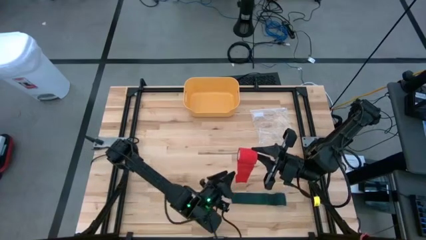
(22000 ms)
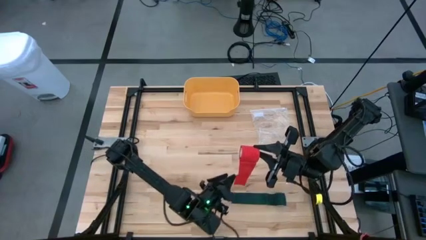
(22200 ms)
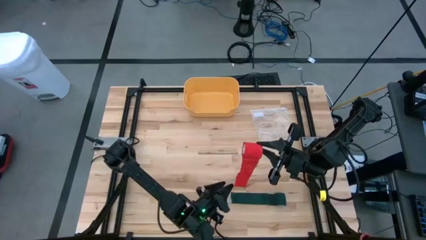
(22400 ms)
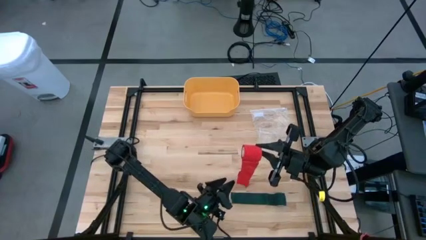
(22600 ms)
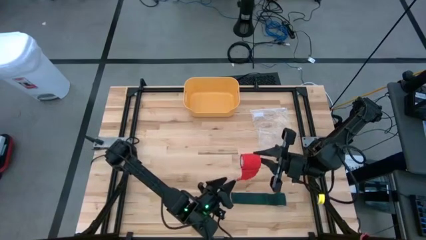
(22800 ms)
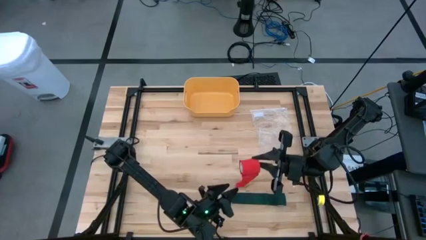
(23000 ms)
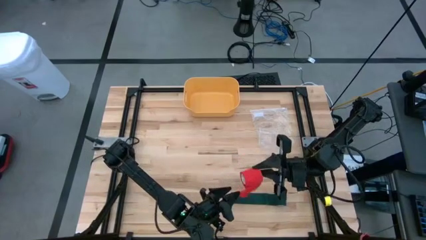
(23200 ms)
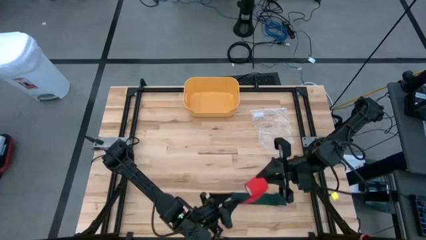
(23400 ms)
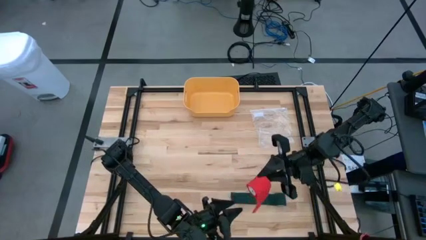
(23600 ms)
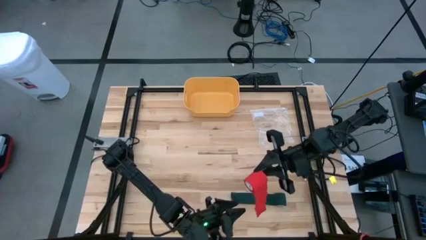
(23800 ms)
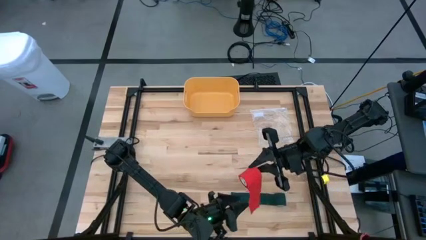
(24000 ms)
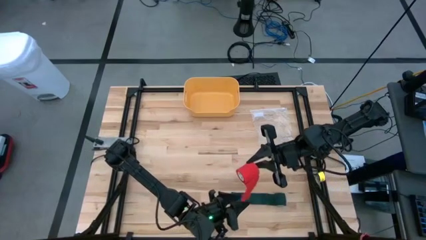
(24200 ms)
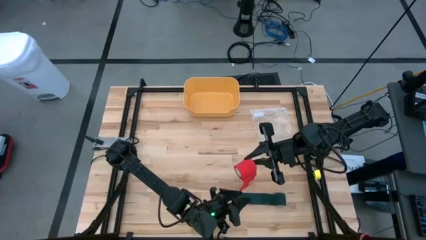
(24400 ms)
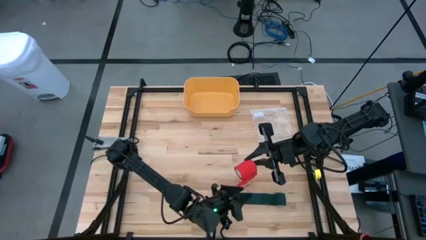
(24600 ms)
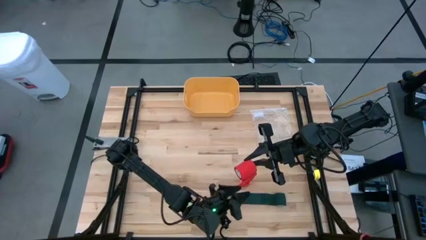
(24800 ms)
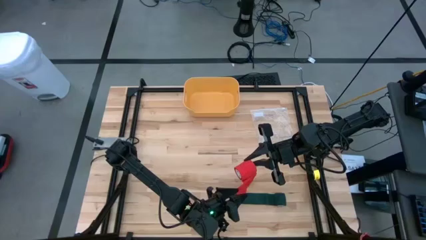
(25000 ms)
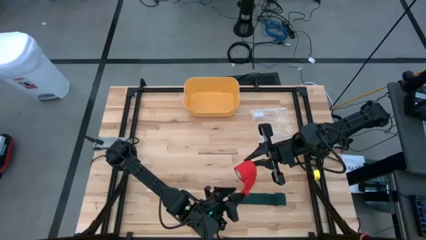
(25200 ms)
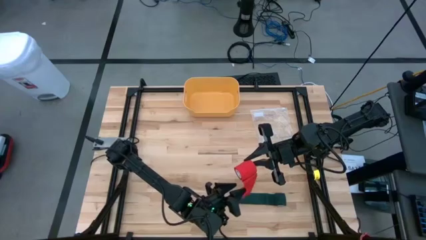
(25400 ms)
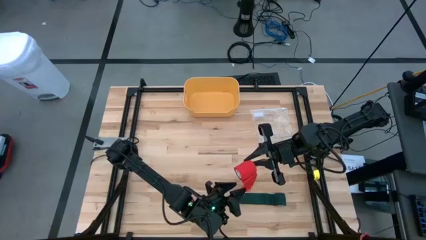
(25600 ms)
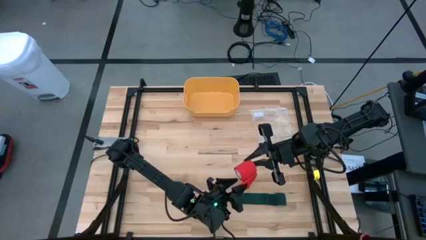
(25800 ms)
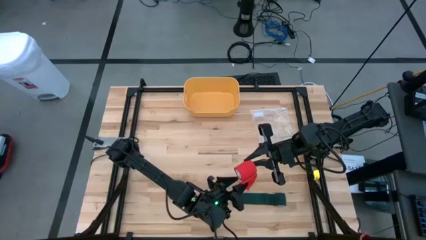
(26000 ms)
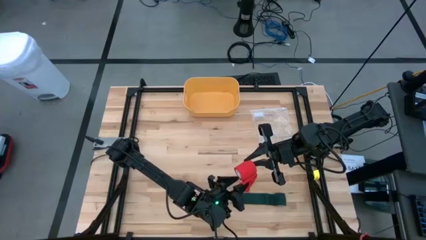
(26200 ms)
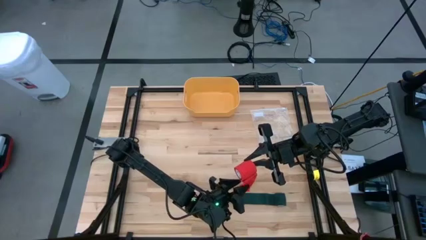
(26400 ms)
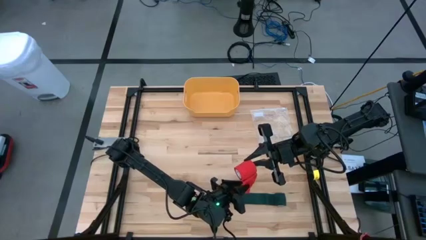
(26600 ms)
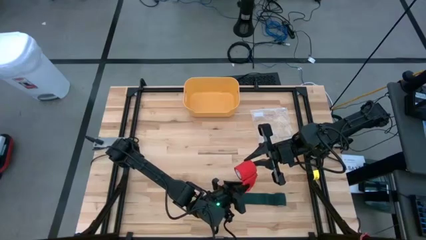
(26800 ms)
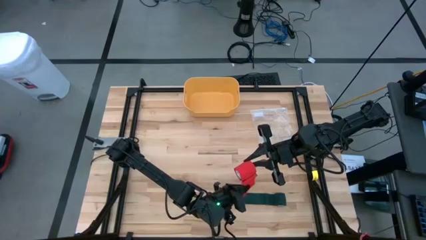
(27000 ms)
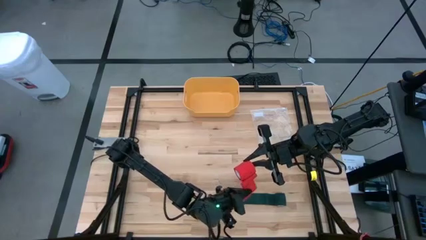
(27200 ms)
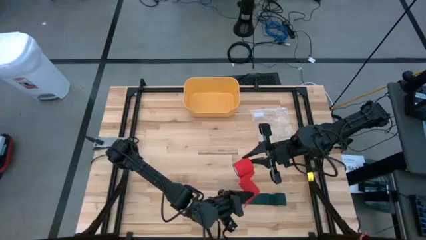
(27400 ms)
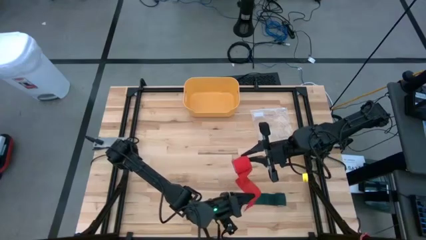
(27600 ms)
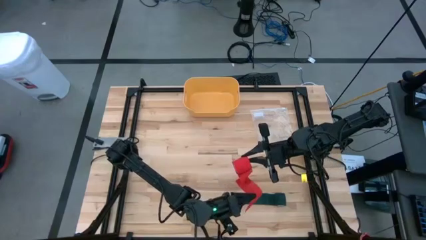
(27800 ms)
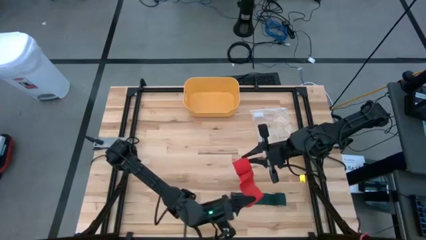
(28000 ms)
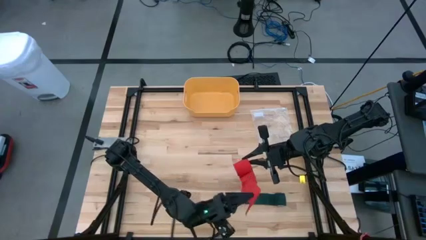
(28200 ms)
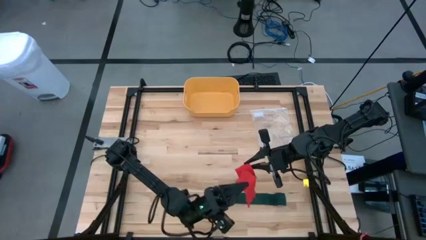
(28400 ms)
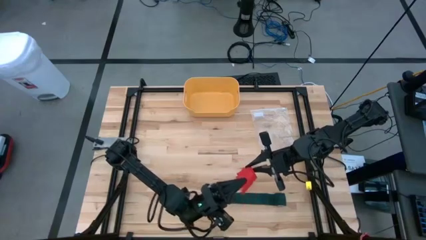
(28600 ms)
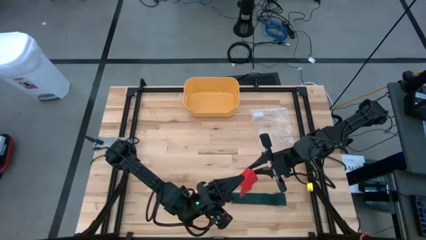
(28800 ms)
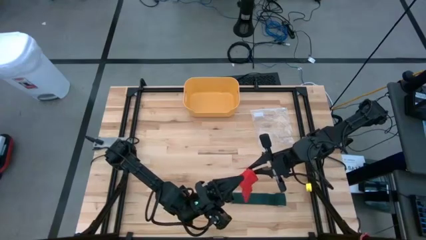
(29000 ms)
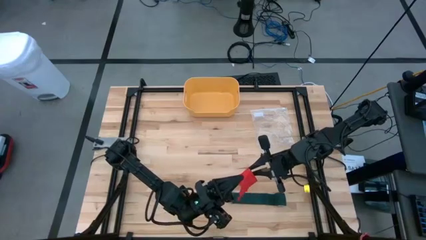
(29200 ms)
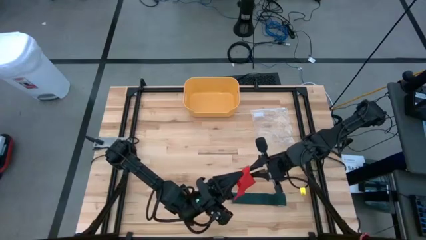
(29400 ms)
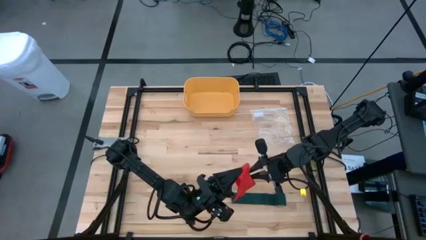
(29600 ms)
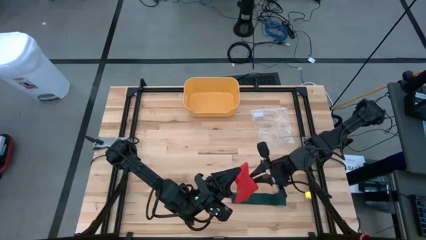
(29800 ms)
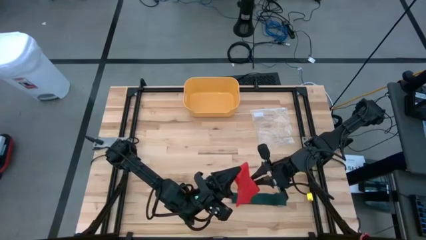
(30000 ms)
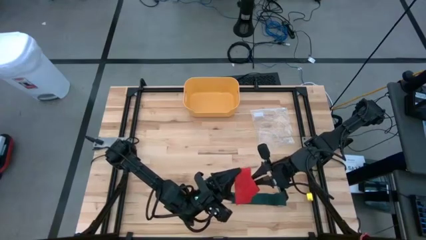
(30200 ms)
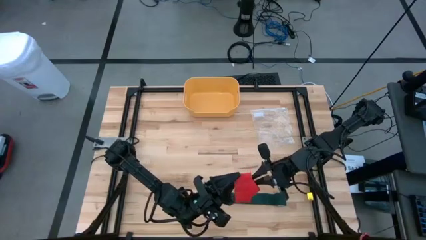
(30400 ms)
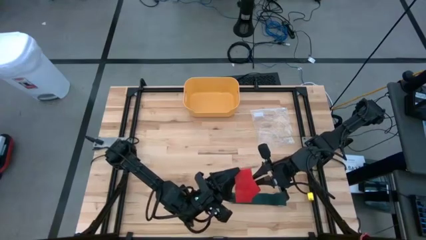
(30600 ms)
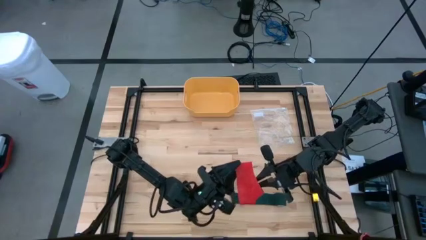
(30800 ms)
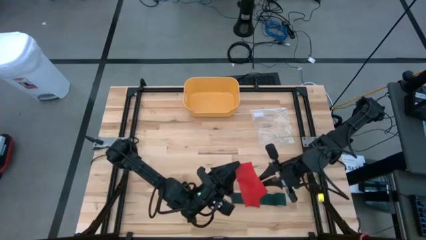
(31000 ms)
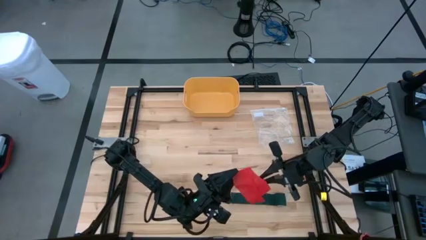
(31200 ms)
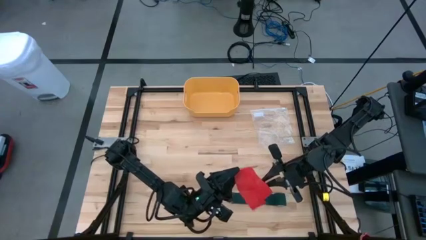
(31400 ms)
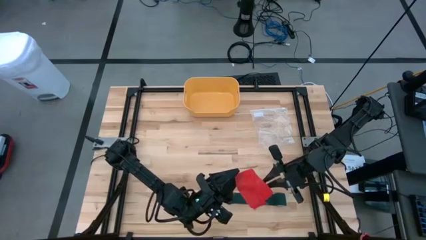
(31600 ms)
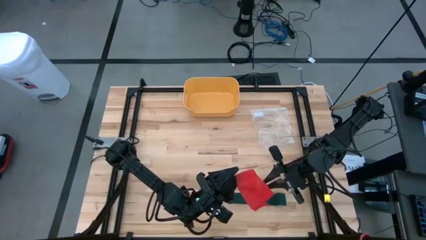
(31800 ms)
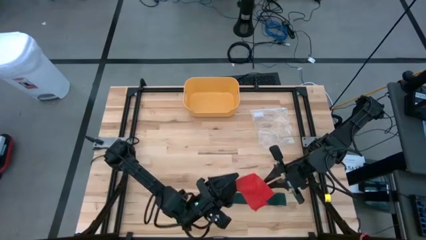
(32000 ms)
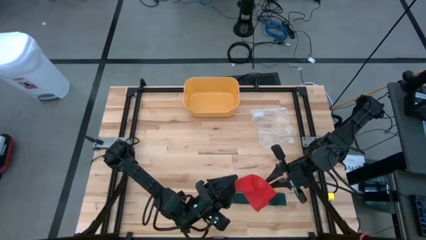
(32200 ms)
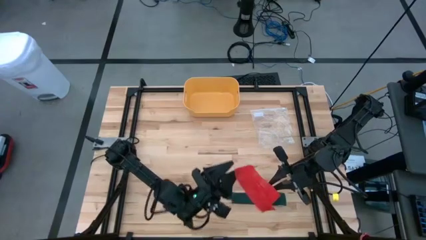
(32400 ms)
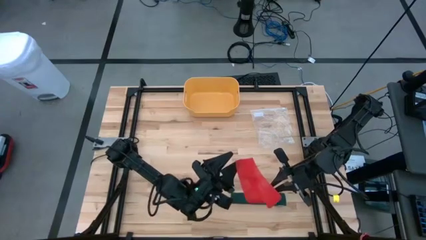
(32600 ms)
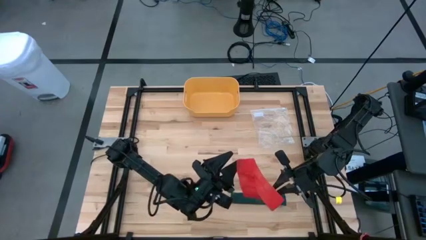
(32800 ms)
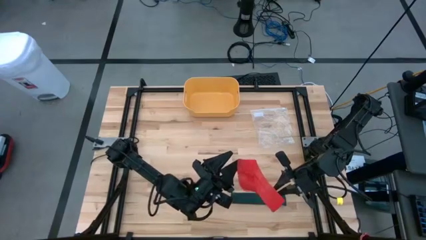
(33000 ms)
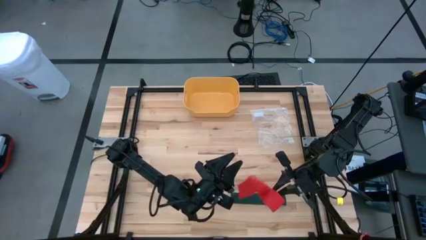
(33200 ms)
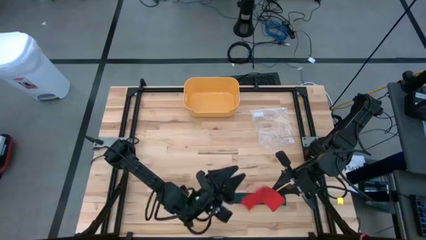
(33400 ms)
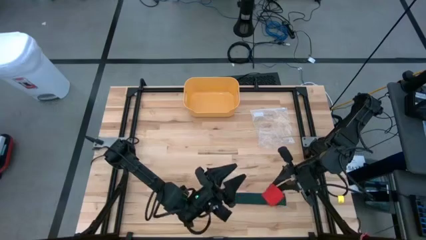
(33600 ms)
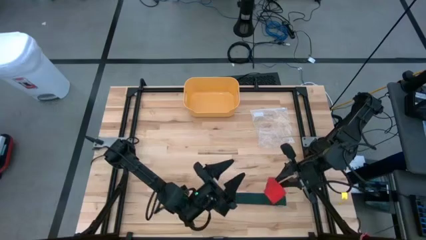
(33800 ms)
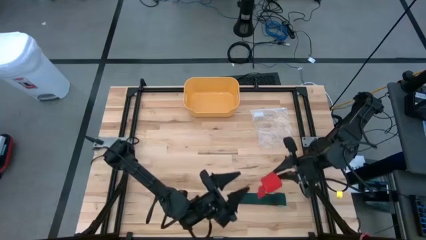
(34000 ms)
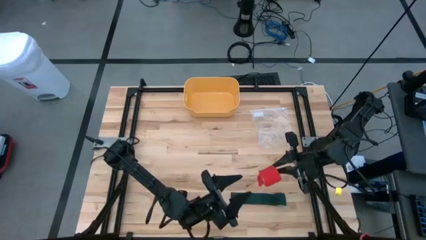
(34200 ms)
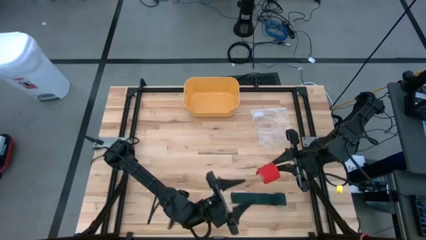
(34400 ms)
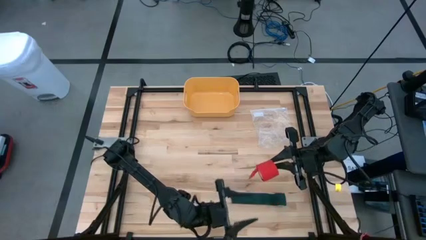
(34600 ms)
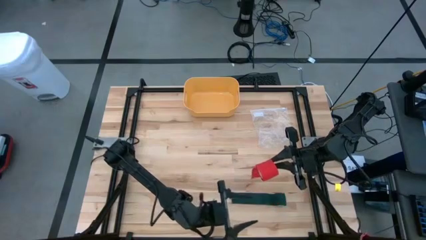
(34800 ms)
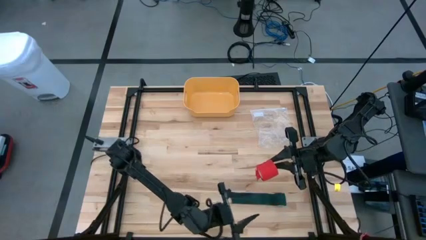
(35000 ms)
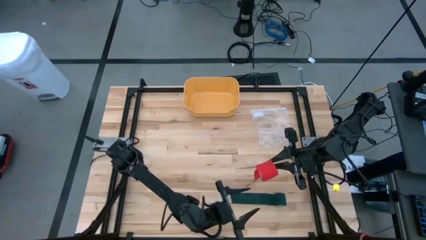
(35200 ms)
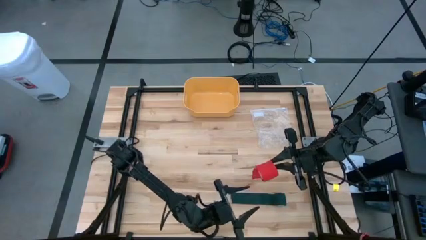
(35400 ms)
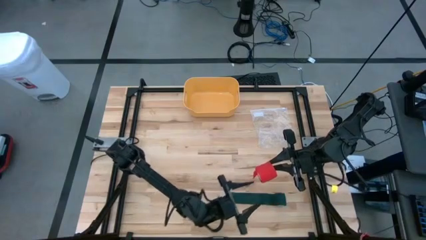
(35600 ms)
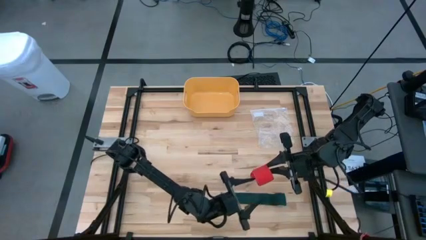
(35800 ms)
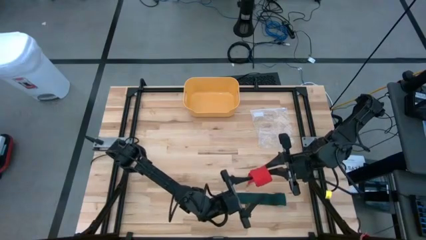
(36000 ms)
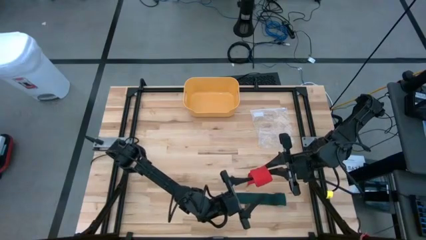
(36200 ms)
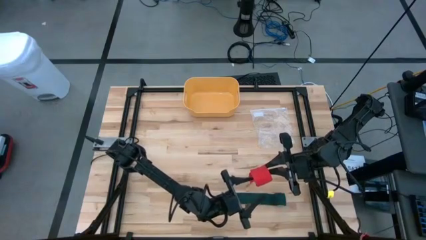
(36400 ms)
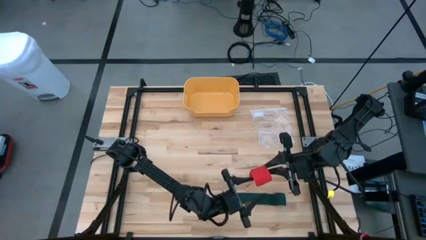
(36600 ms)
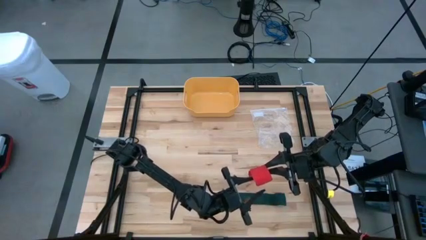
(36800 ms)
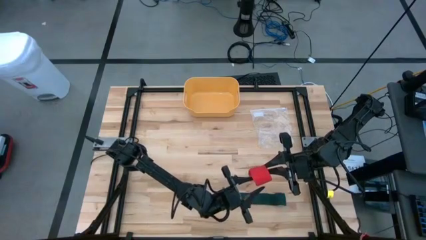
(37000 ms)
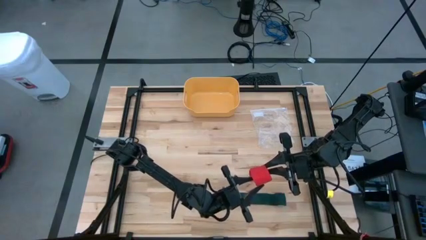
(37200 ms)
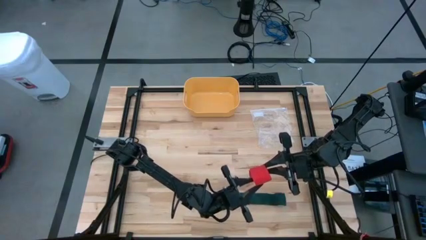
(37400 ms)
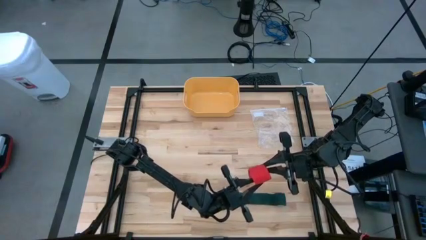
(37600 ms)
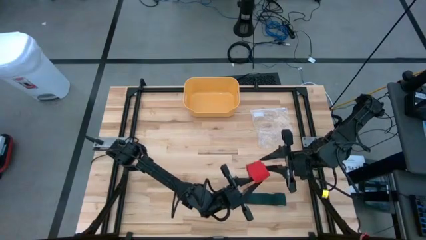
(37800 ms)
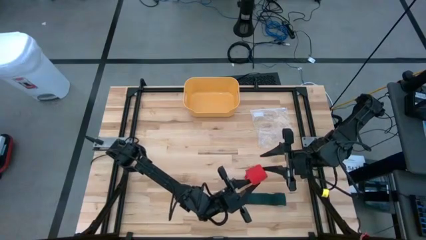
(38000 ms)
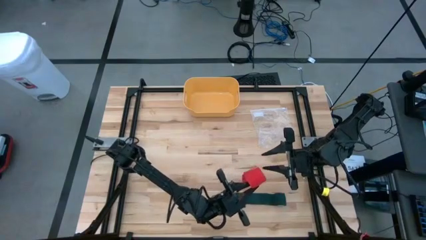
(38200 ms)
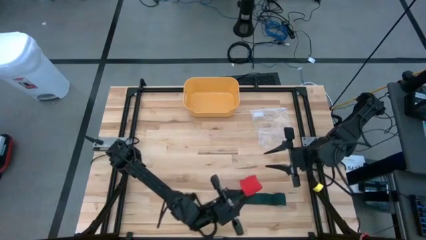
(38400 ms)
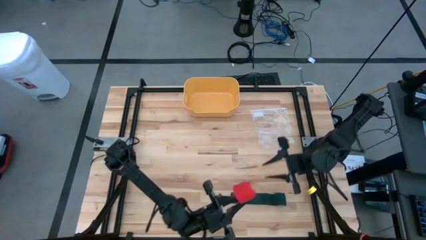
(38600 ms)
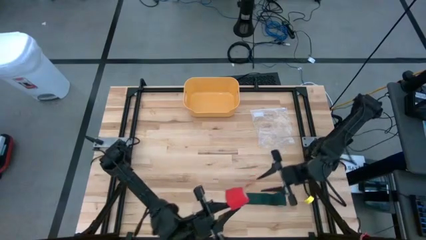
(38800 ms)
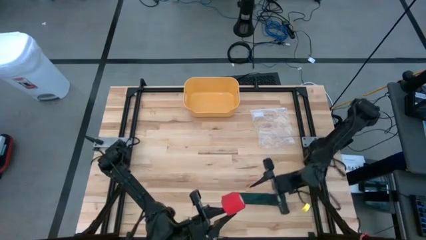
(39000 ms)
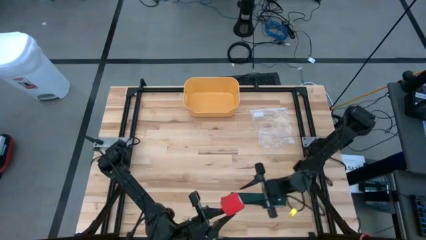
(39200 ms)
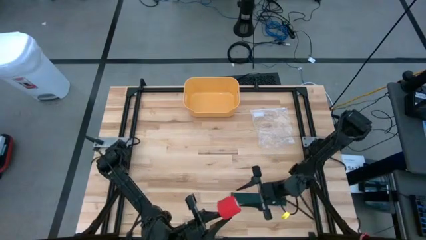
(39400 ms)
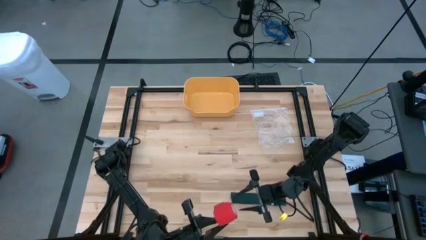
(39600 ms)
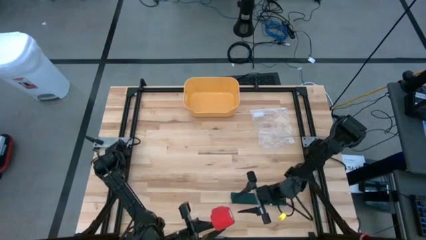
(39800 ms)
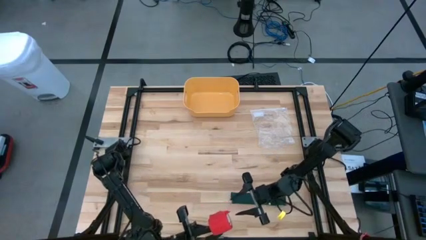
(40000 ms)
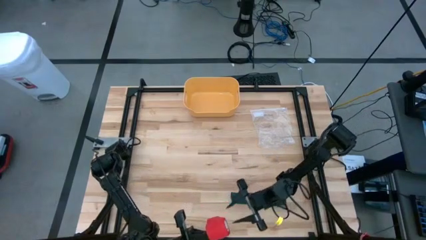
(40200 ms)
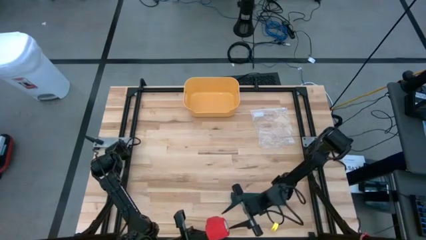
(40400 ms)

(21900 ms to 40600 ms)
Task: Roll bandage
Roll the red bandage
